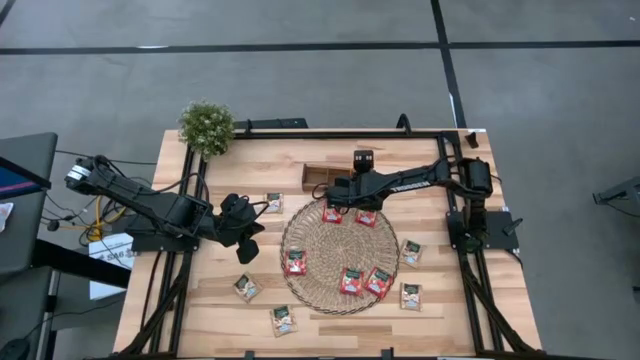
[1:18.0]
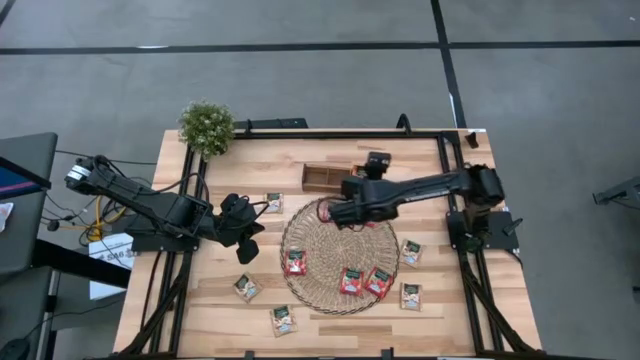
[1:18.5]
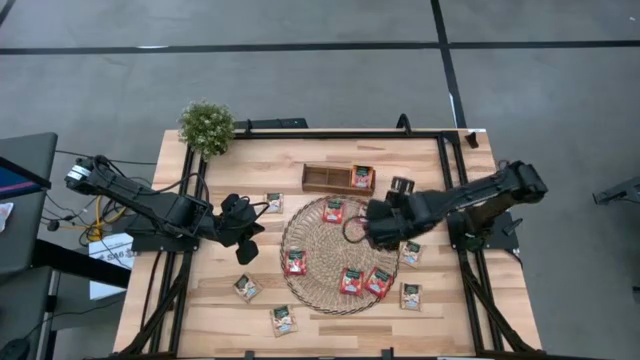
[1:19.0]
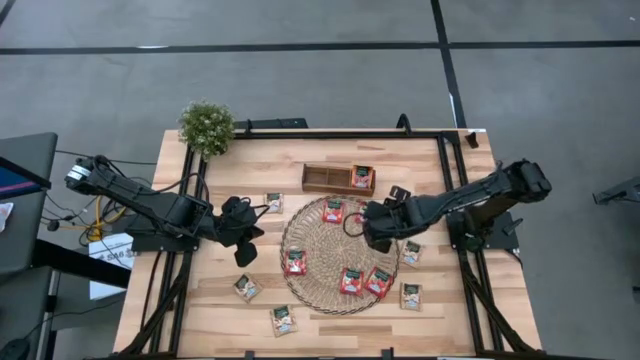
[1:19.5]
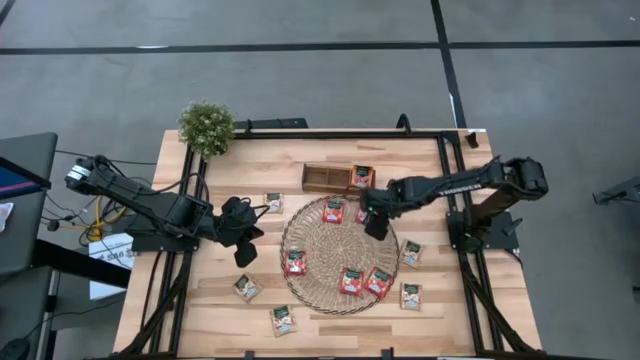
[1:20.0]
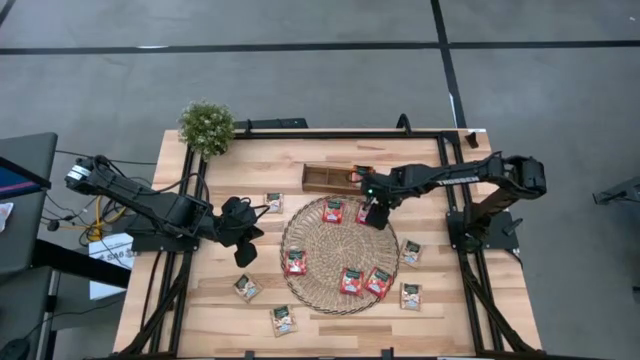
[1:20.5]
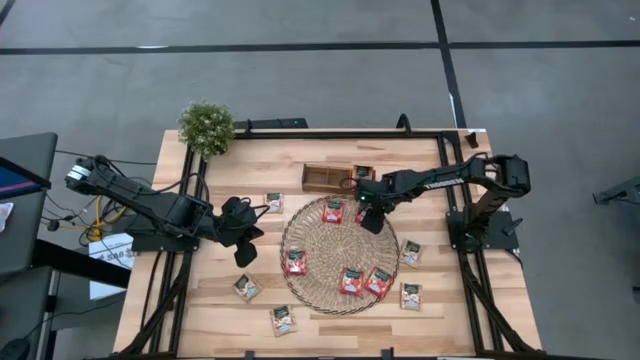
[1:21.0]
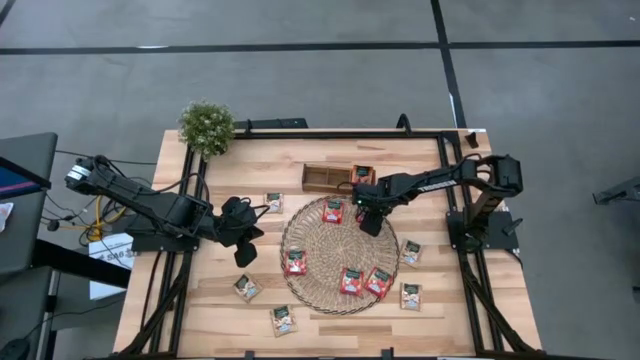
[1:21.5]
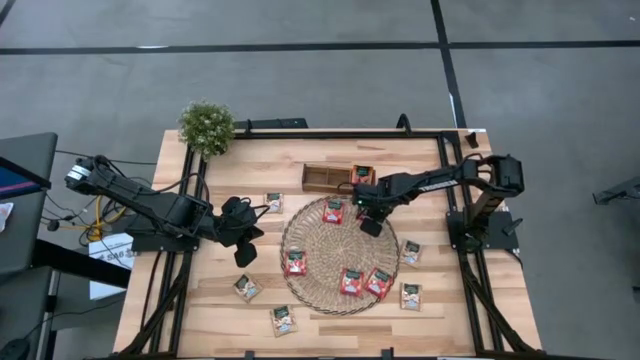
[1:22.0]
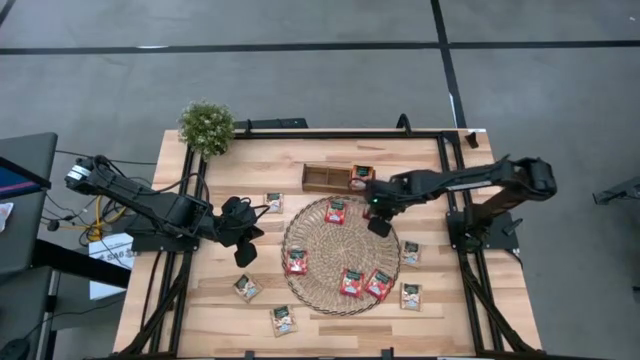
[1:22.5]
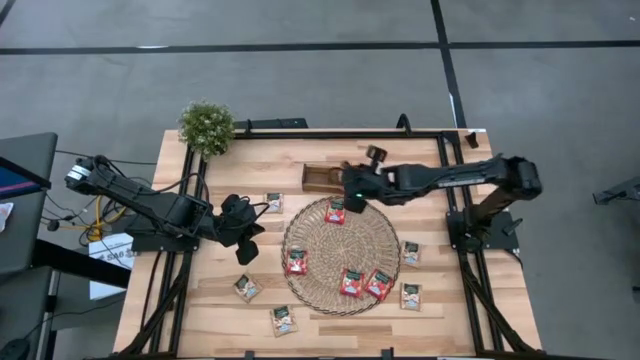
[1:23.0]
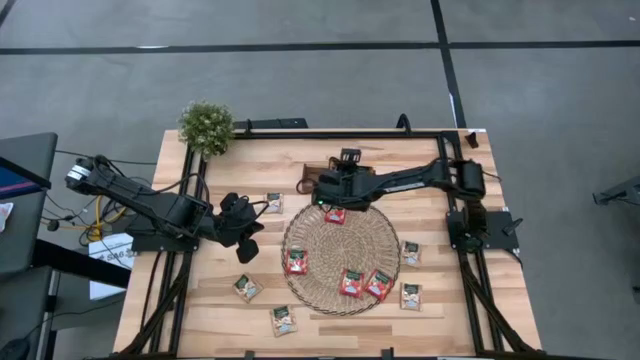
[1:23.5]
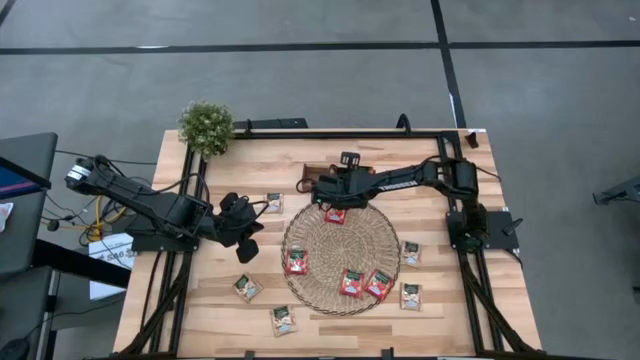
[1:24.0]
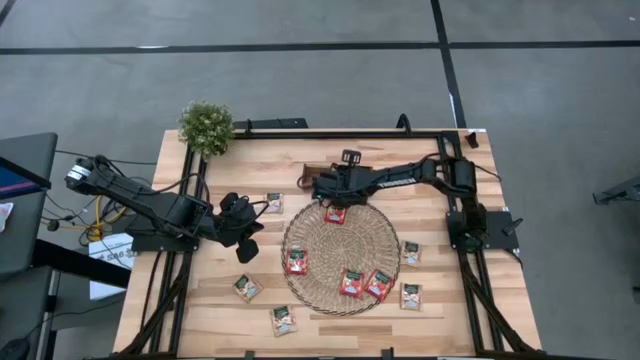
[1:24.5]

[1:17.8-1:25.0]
Task: Pick & Place Tea
Put the red tea bag into the middle section of the wooden organizer

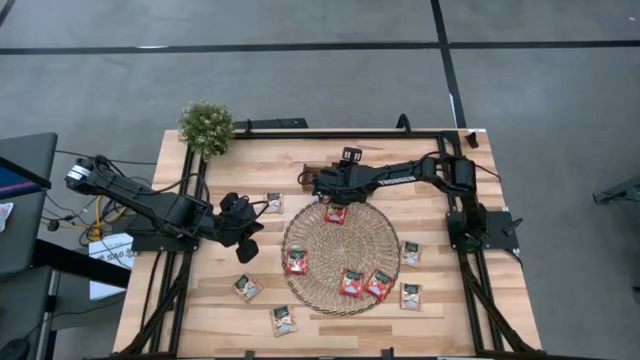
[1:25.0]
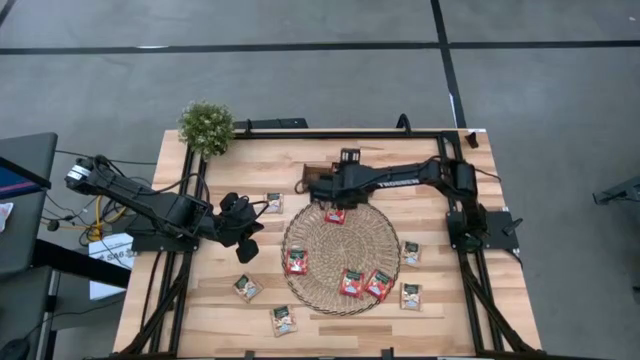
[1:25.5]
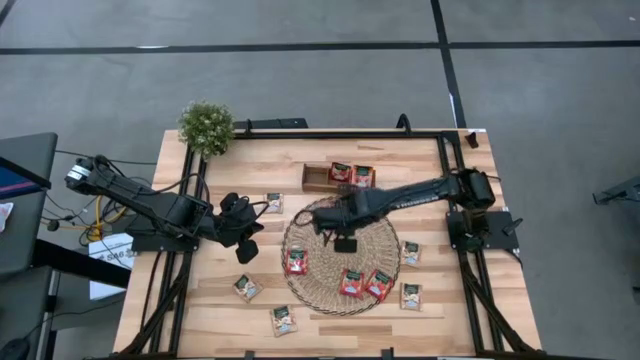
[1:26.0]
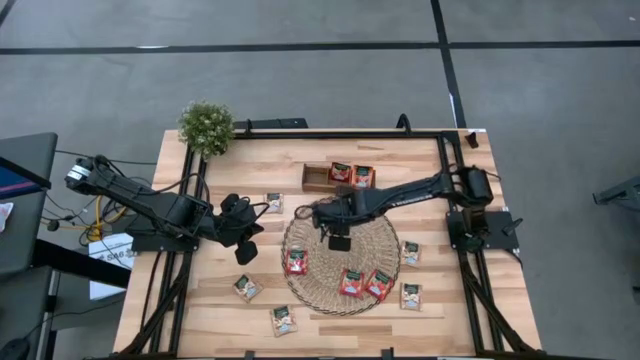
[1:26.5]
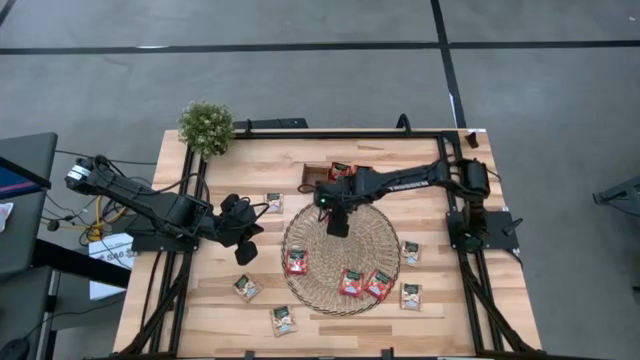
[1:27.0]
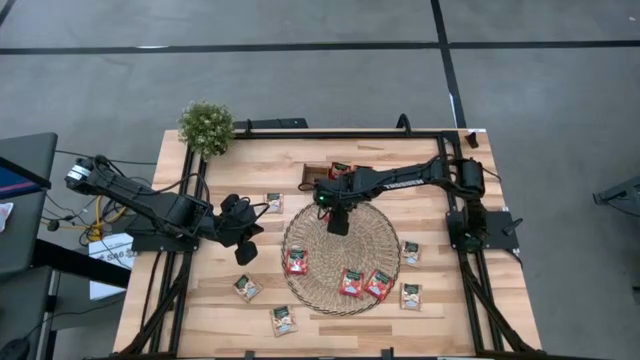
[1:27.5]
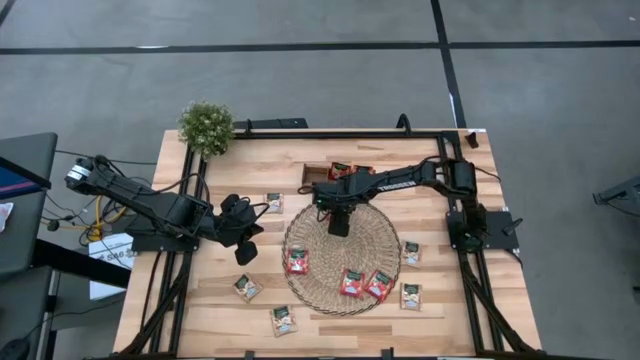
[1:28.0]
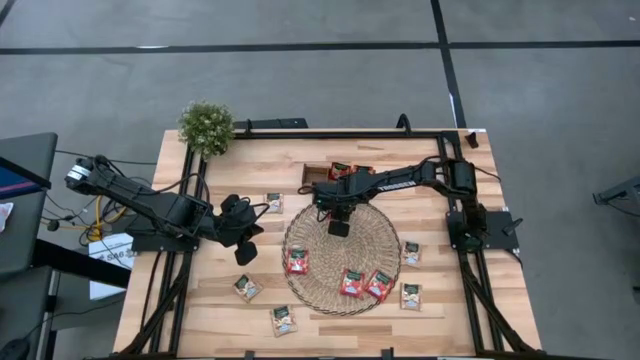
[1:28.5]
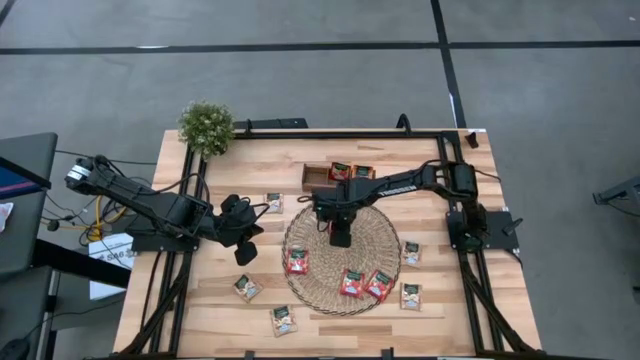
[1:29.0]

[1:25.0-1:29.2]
Put the red tea bag into the middle section of the wooden organizer

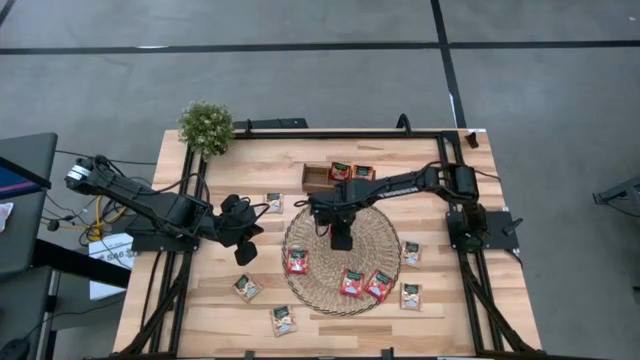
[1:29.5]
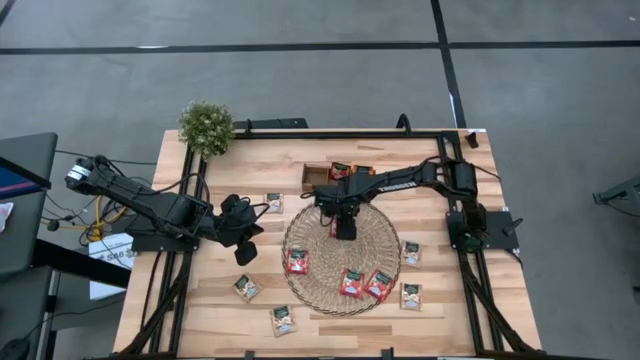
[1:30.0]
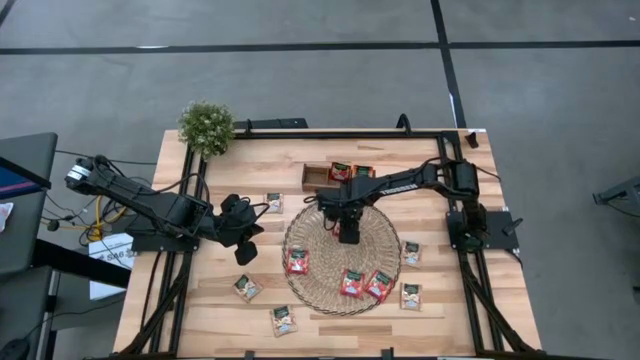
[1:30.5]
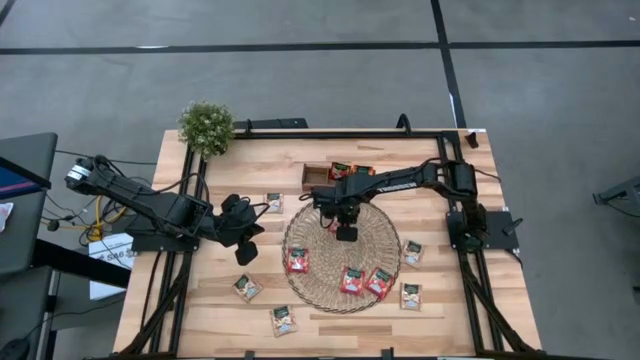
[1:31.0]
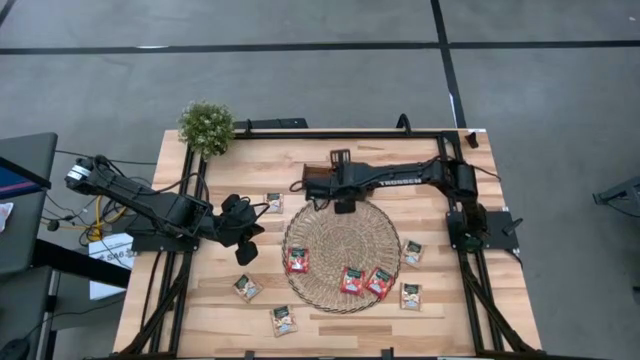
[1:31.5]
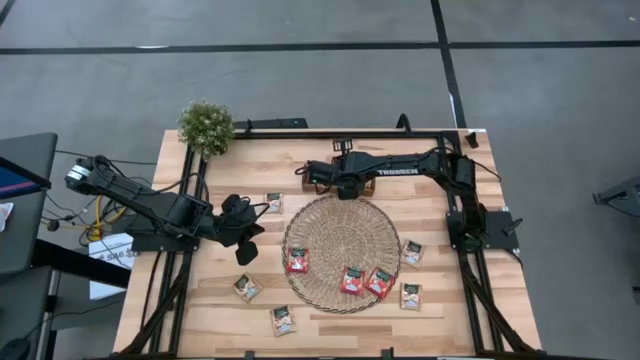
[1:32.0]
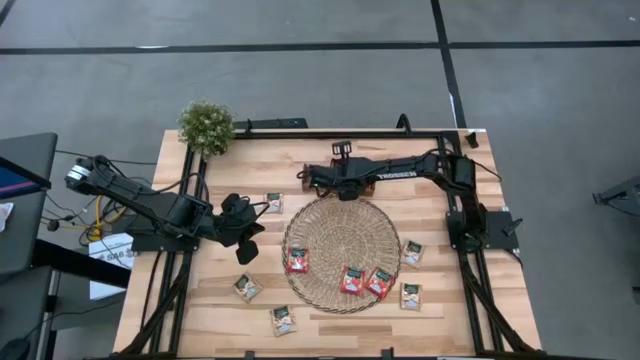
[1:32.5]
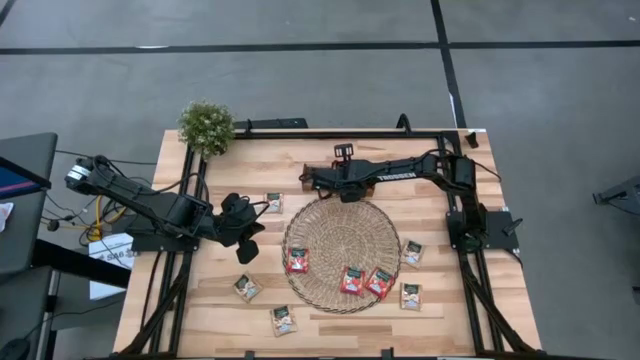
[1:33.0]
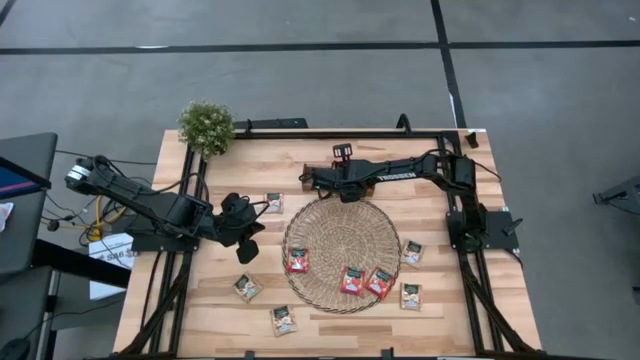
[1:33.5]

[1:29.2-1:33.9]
Put the red tea bag into the middle section of the wooden organizer

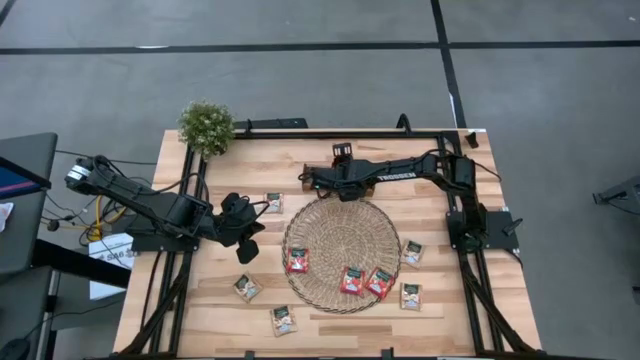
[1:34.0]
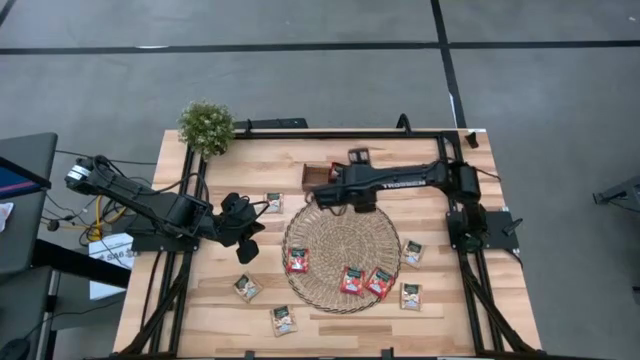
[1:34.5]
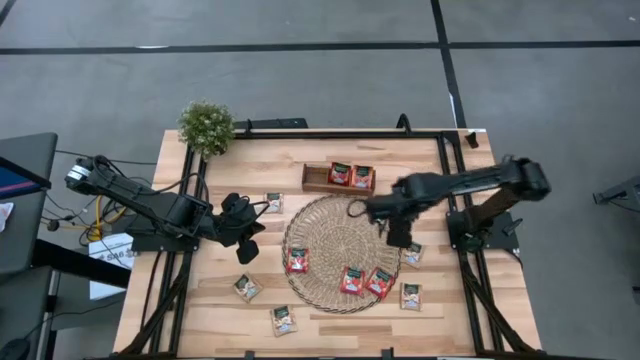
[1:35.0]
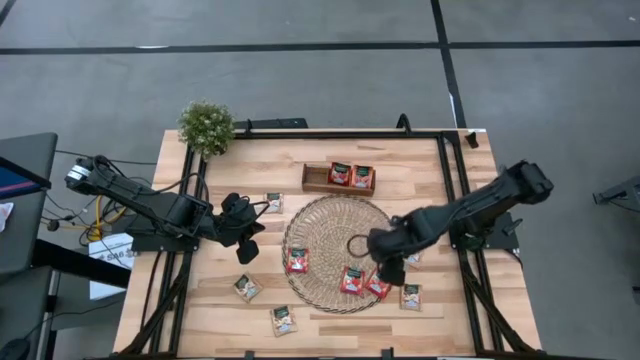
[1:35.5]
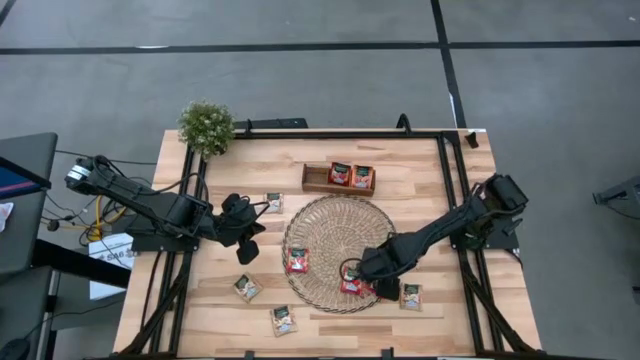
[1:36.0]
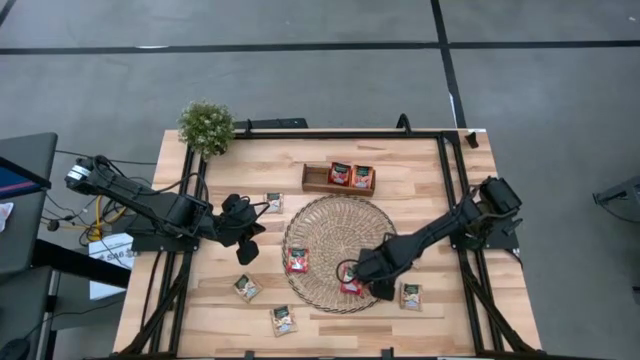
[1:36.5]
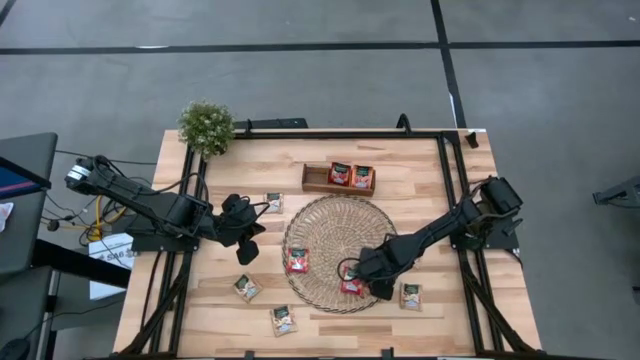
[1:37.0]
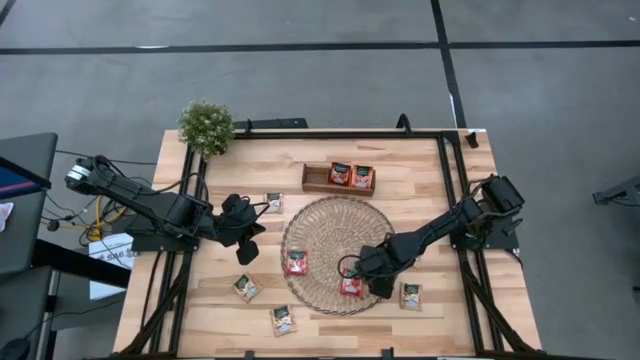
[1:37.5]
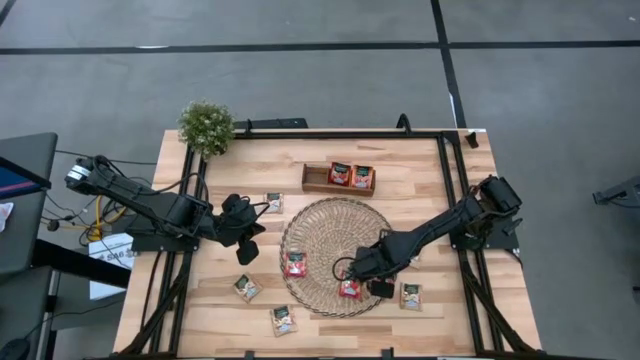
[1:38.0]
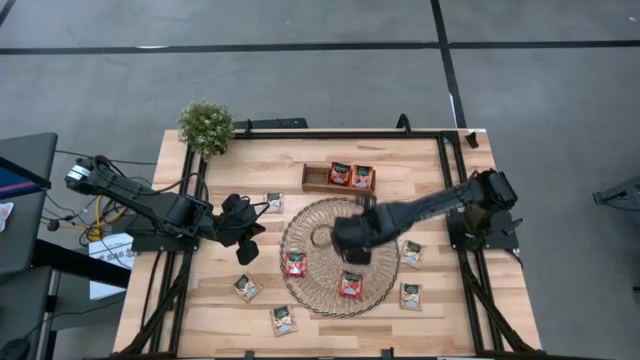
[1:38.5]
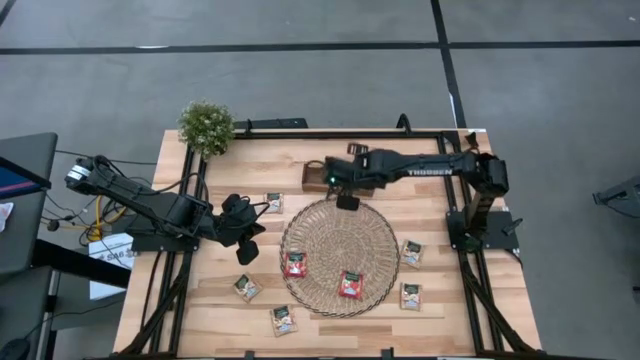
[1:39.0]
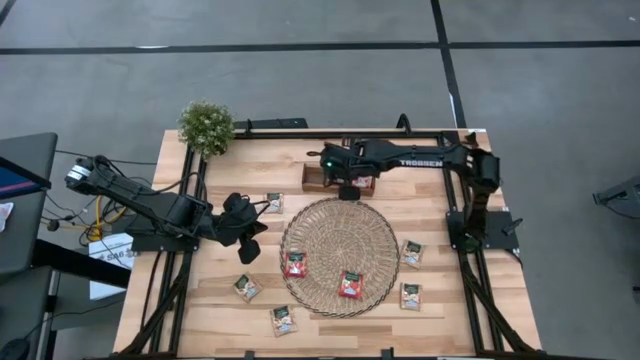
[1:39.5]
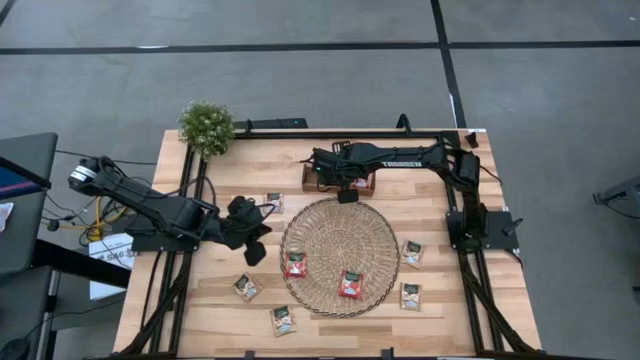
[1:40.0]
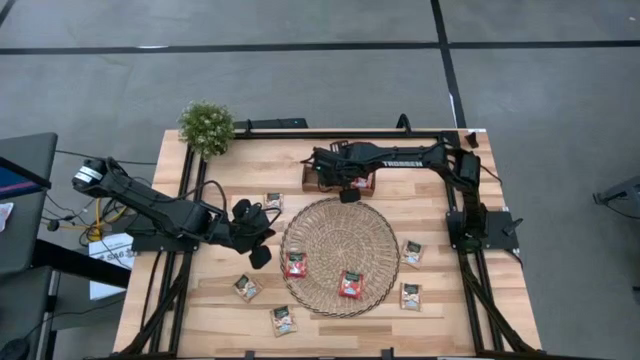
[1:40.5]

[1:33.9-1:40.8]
Put the red tea bag into the middle section of the wooden organizer
